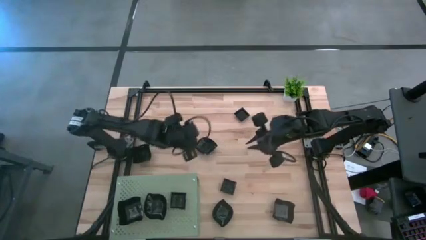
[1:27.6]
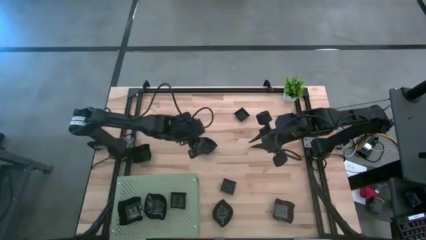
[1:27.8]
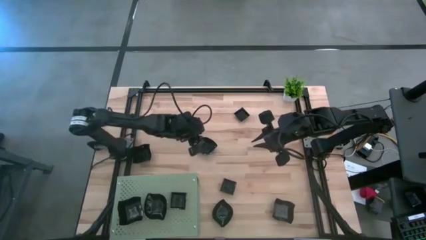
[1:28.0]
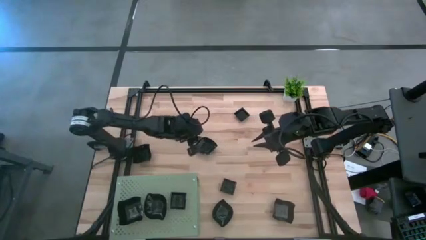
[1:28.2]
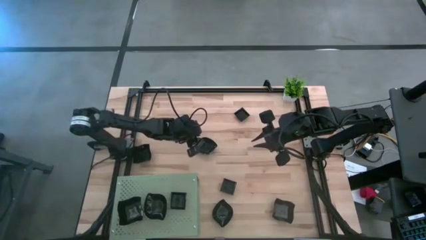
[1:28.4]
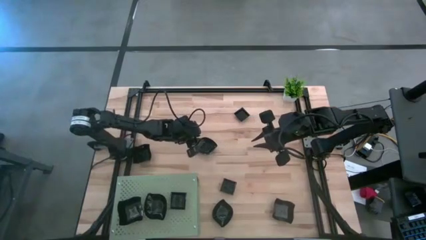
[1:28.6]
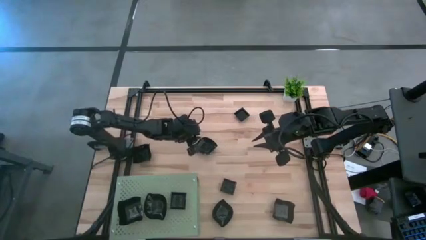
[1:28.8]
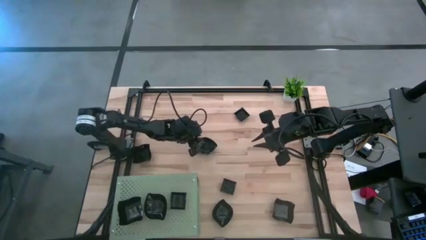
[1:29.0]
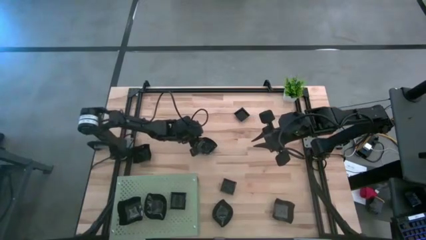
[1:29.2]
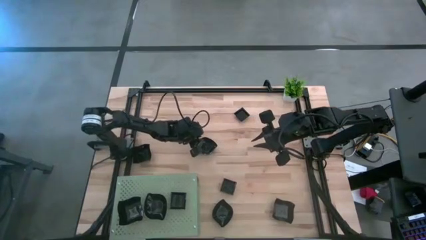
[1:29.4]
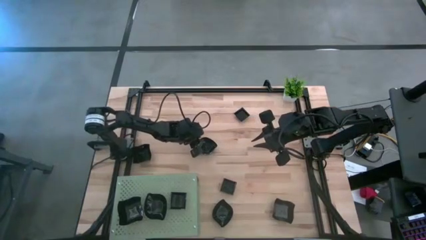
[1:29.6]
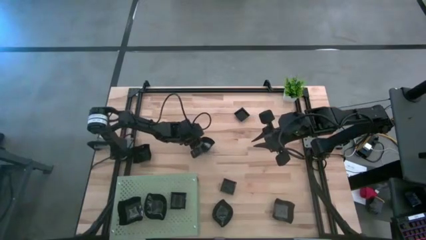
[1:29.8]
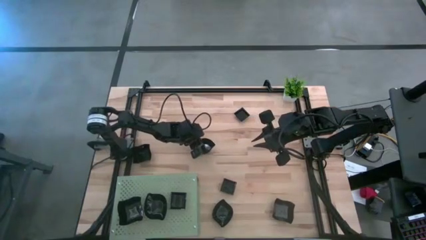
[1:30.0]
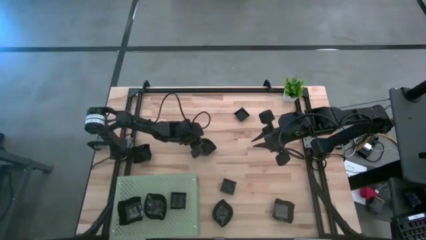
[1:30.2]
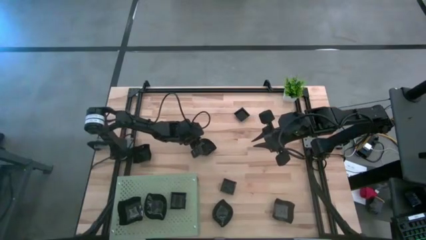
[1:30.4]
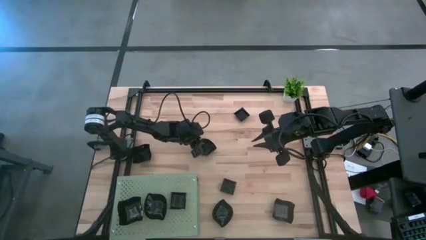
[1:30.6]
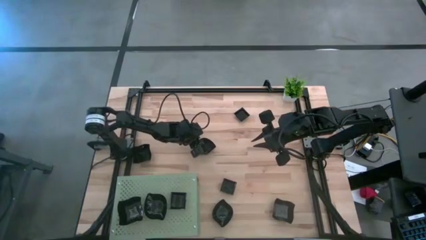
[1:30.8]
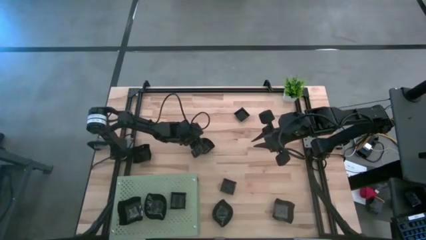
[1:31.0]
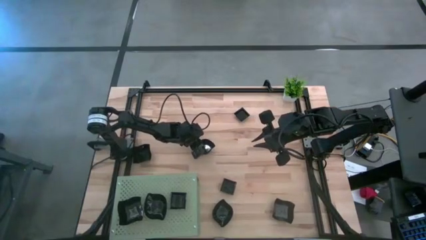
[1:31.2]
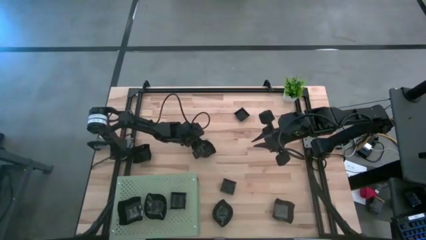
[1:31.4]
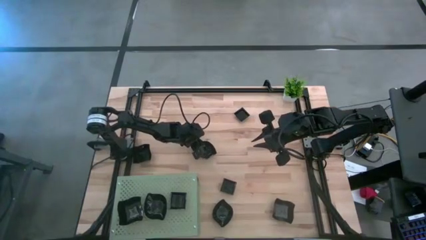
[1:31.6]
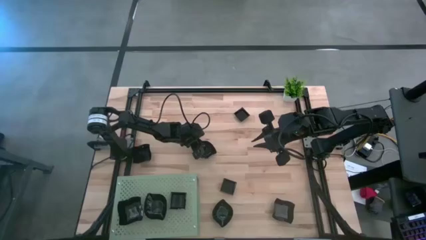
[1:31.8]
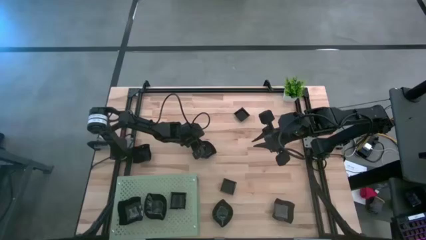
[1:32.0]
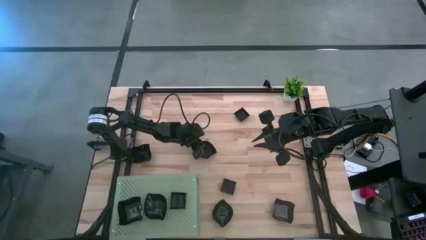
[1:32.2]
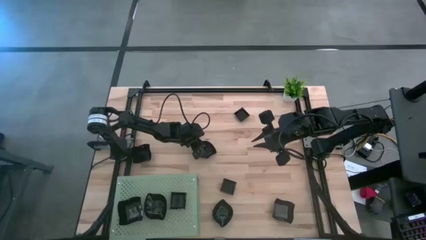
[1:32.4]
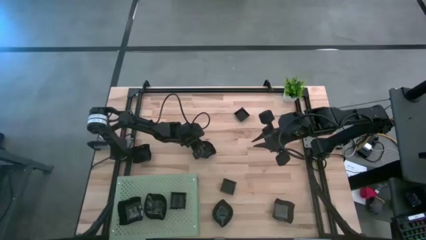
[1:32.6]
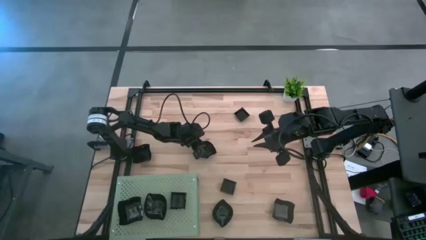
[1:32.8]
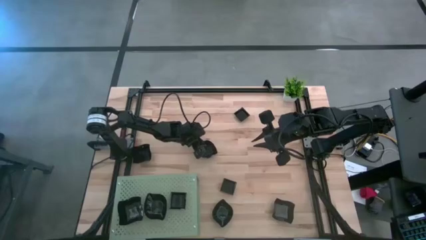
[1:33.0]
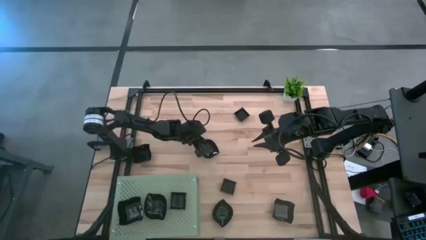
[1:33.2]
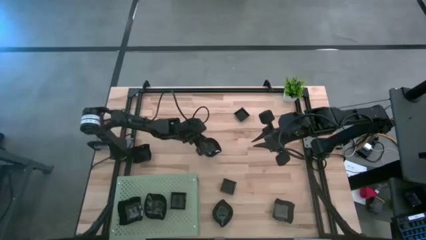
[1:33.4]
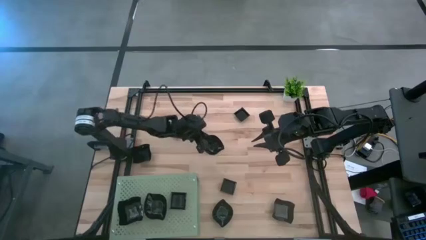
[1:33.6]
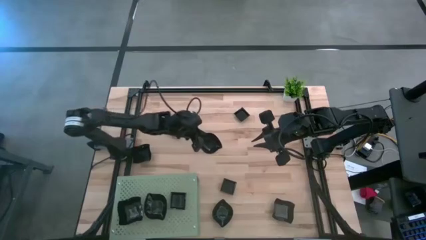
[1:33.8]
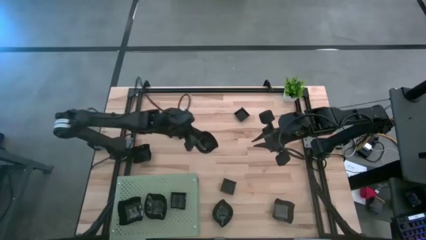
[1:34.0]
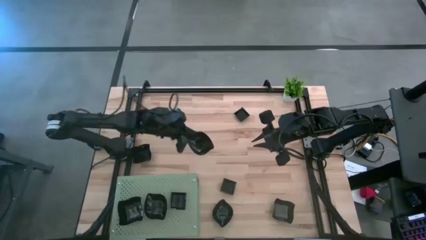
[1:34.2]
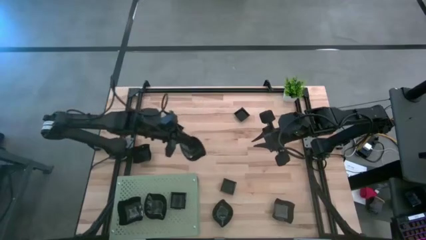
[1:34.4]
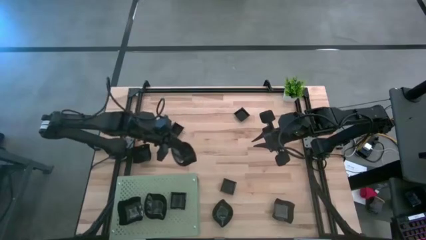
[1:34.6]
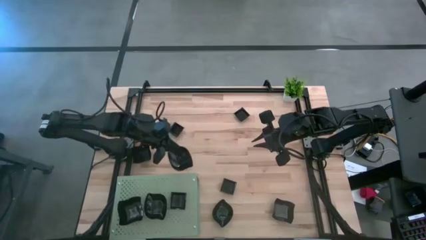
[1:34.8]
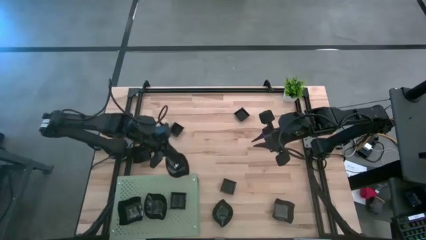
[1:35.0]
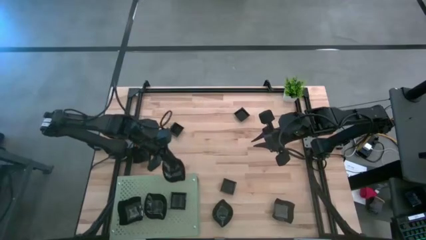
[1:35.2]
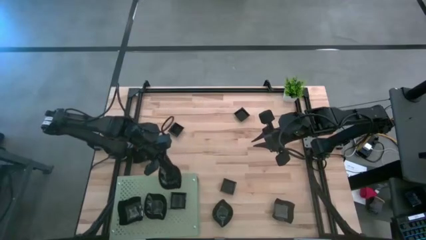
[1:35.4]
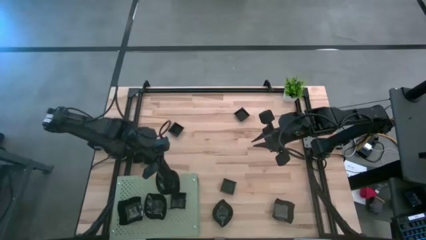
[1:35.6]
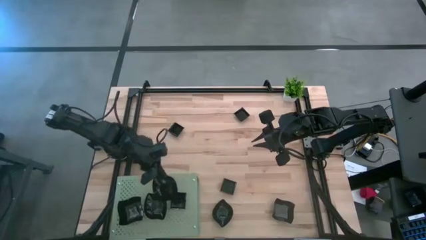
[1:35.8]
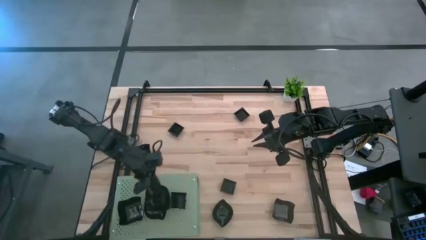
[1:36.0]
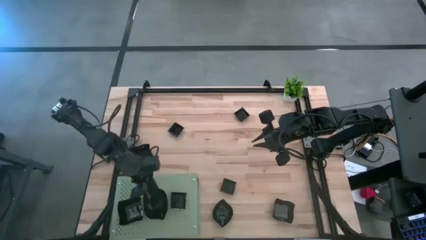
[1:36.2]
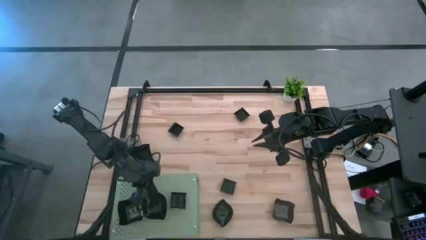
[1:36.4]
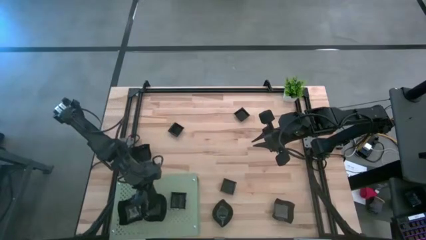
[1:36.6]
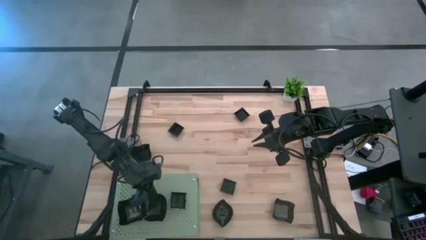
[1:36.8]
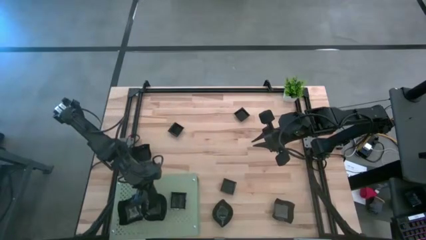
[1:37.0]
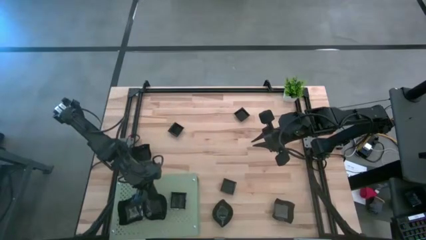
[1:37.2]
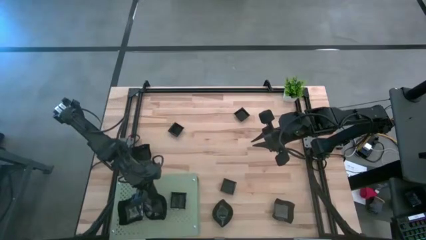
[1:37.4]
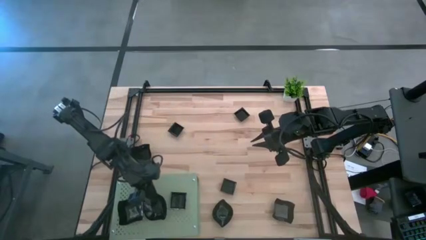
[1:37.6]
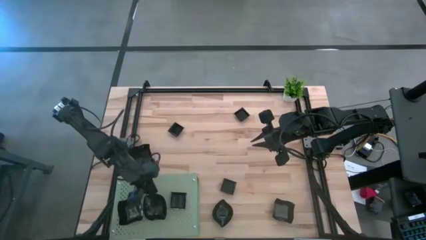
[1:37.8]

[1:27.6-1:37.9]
Task: Pick & Place Mini shaped plates
Stack the black leaf shaped plate on top of the other black leaf shaped plate on the shelf

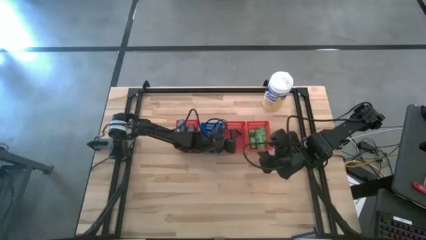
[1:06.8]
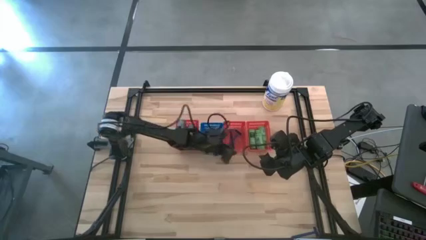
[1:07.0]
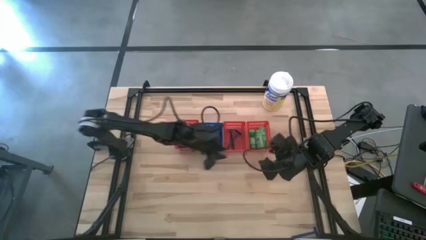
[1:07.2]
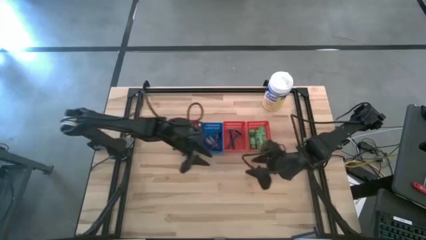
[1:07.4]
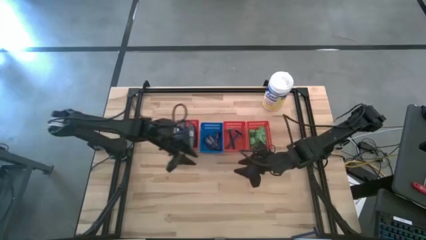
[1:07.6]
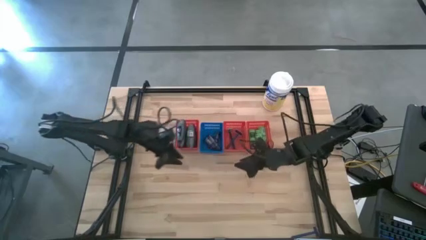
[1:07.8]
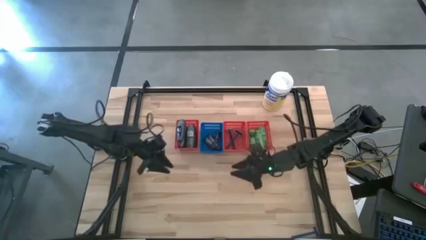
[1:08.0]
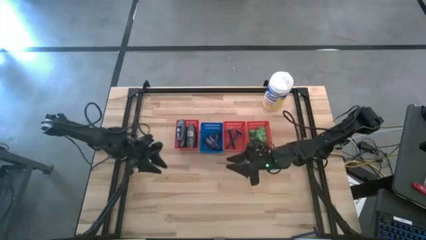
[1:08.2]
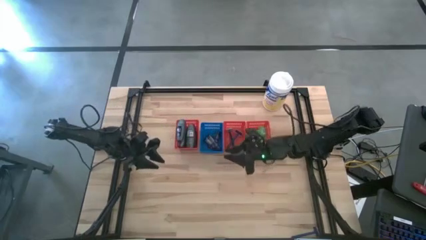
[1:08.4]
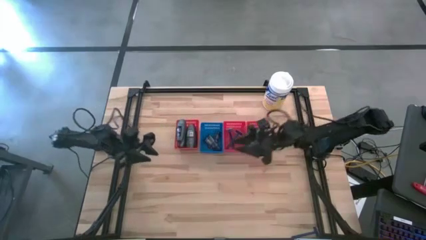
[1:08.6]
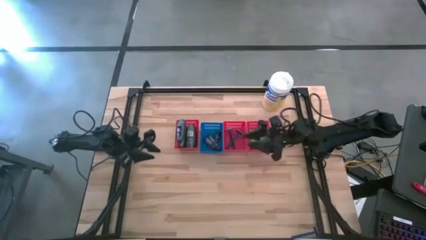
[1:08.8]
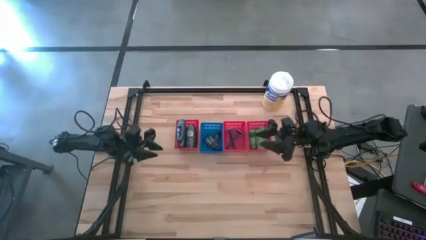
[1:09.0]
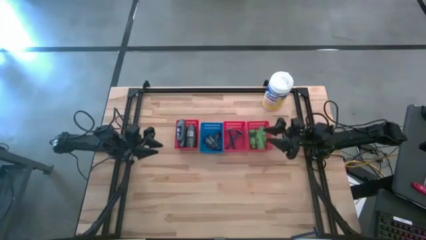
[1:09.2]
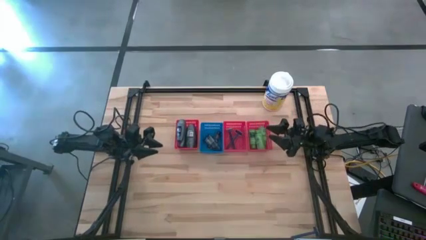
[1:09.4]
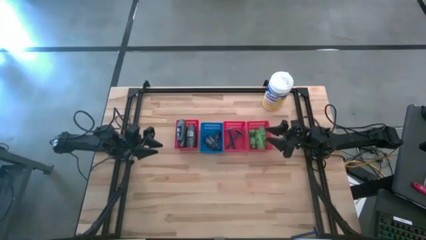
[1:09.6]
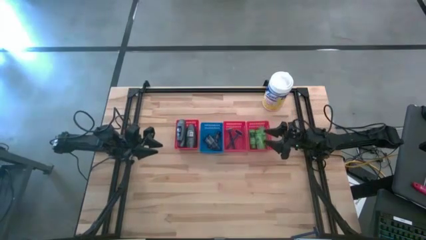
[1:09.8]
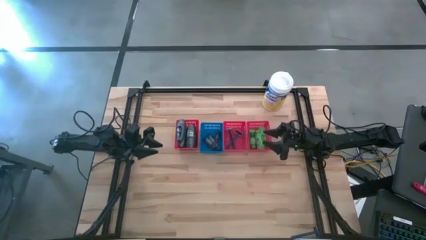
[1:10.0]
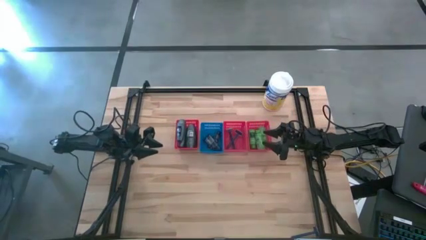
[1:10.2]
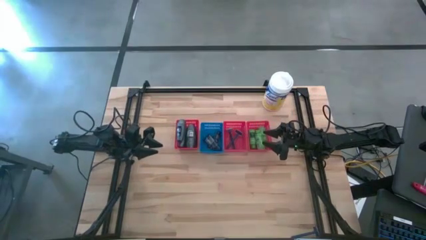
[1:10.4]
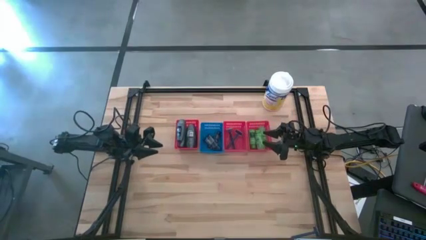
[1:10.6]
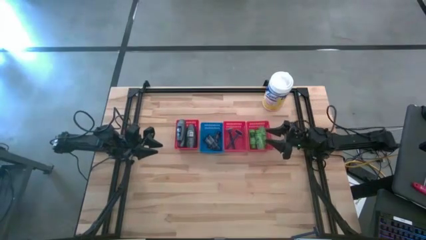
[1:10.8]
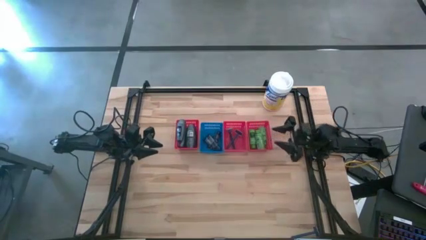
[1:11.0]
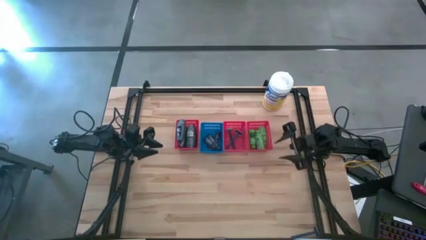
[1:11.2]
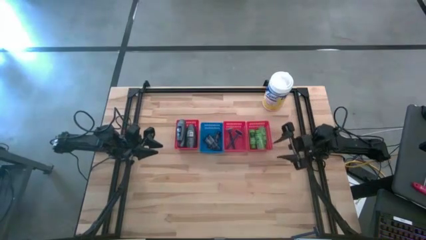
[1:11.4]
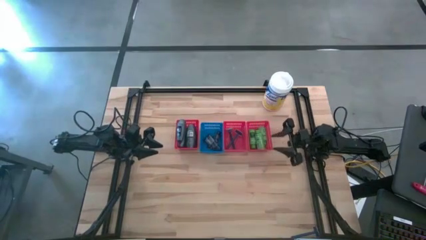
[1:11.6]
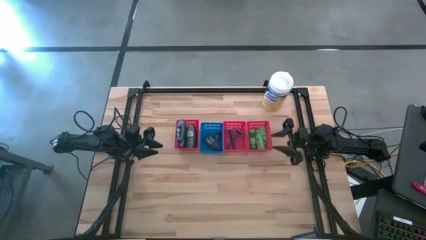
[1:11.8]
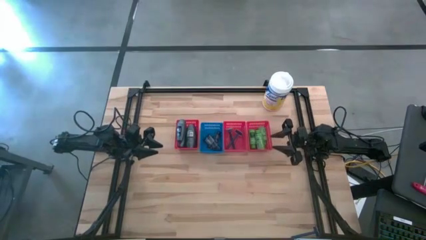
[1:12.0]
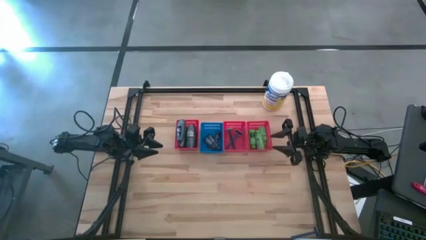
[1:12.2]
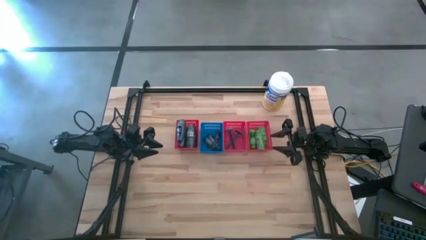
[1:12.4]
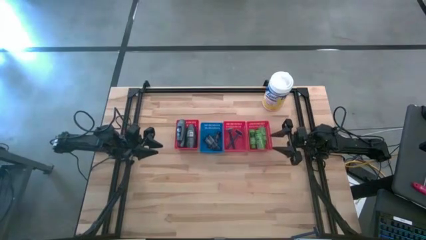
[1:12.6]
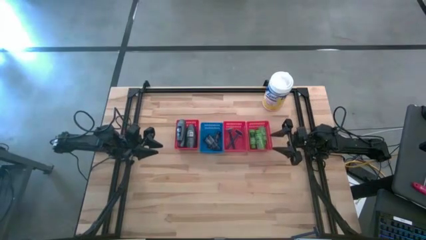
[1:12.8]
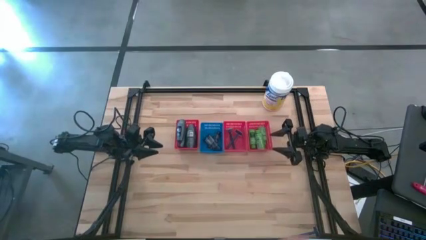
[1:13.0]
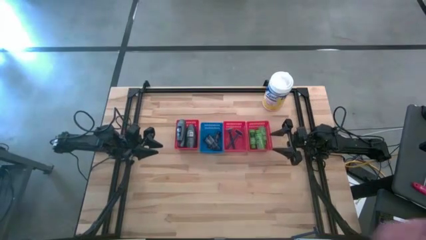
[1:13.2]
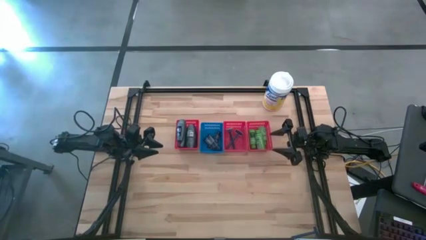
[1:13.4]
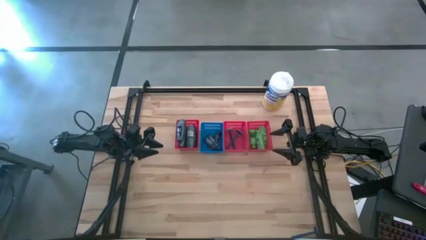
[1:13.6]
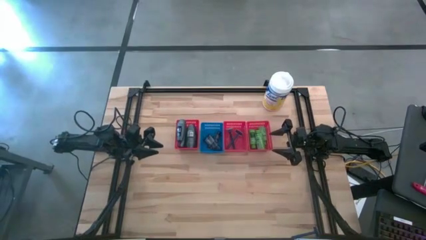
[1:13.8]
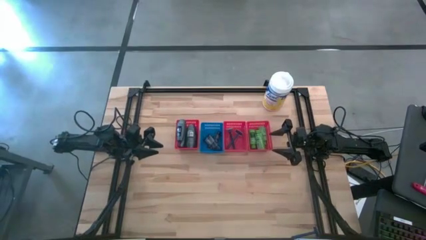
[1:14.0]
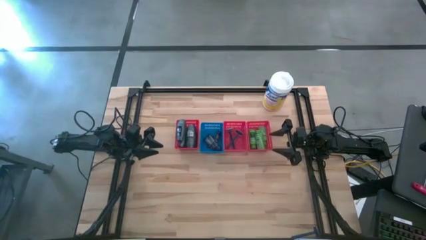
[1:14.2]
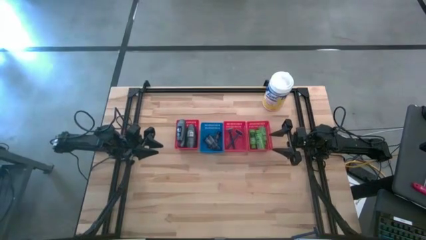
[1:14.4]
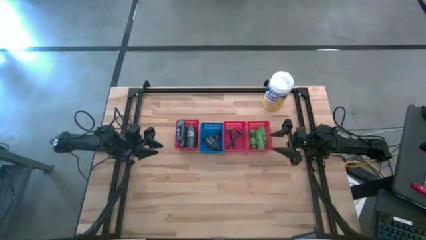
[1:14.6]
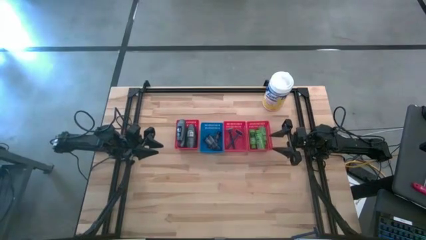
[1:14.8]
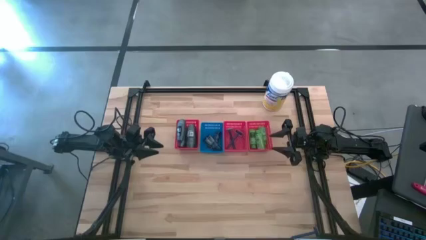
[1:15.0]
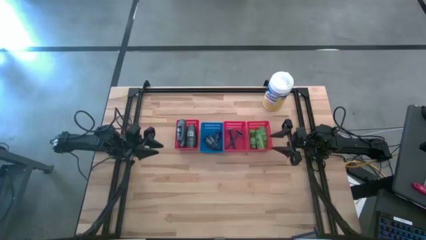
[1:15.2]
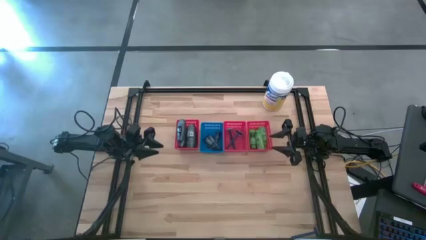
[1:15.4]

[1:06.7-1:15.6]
Task: Pick & Place Travel size toiletries
Return to Home Position
